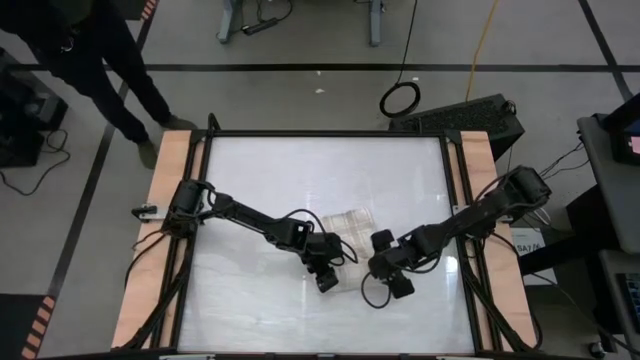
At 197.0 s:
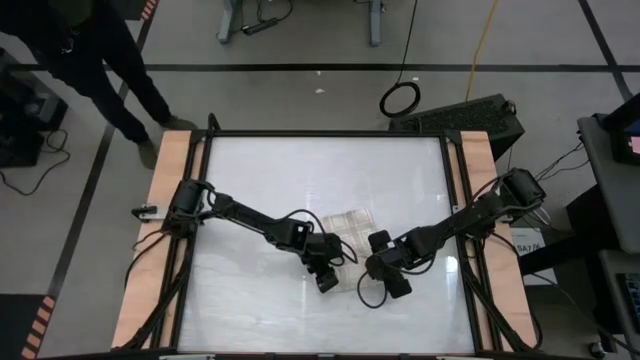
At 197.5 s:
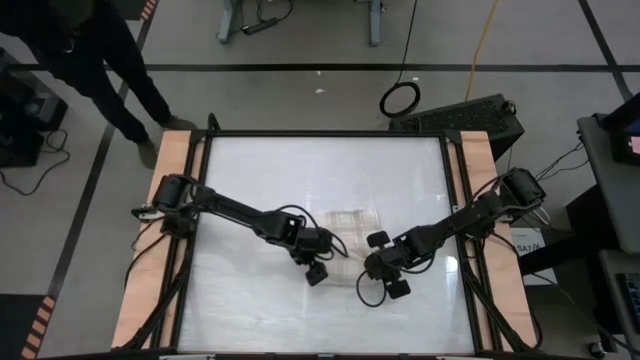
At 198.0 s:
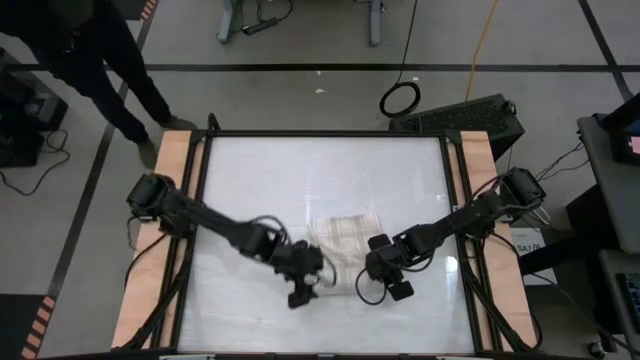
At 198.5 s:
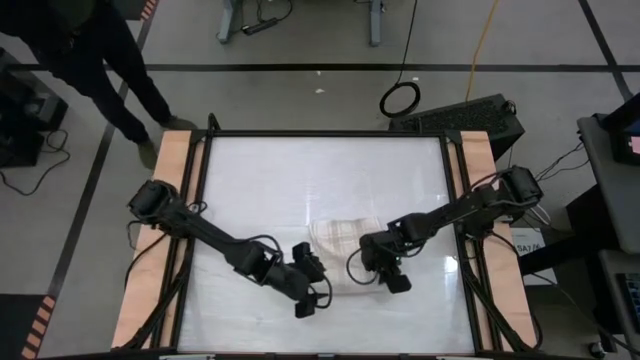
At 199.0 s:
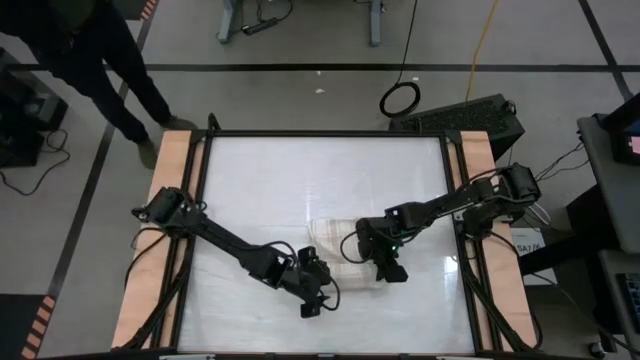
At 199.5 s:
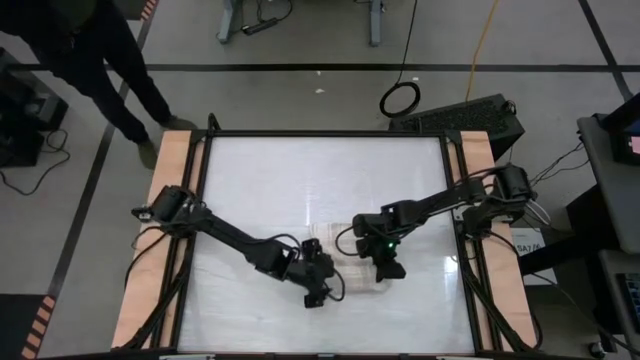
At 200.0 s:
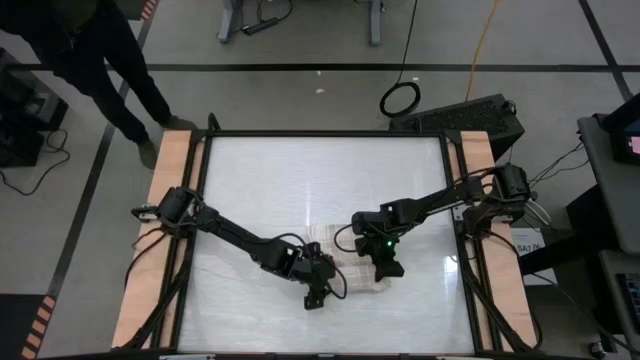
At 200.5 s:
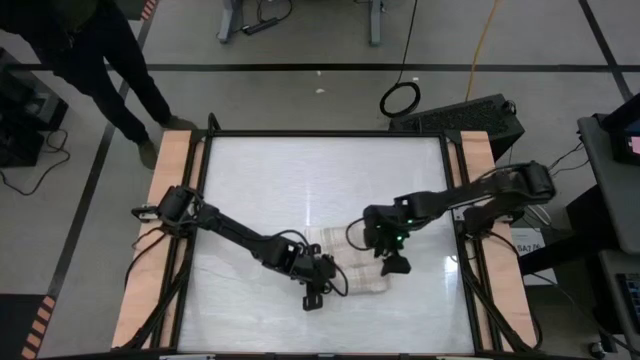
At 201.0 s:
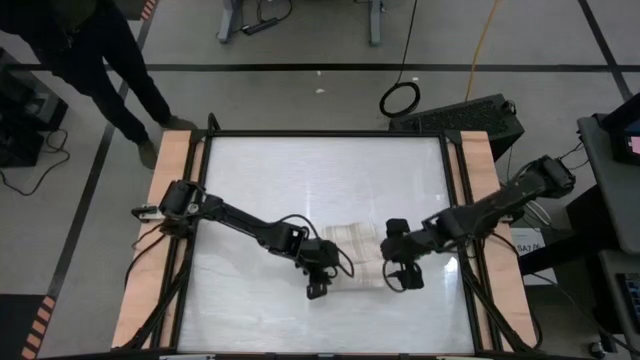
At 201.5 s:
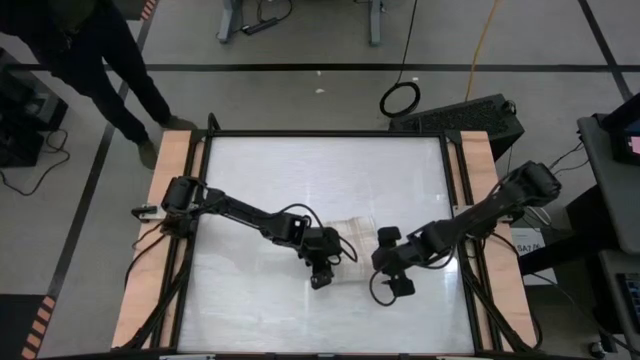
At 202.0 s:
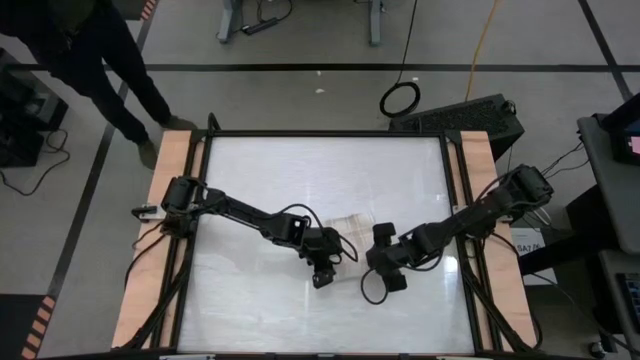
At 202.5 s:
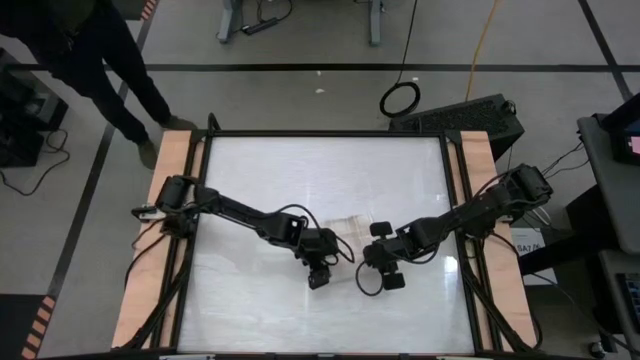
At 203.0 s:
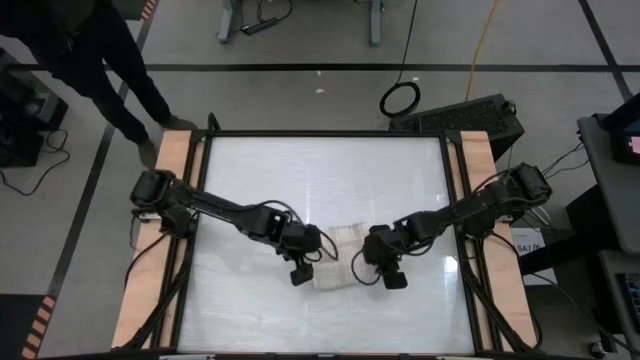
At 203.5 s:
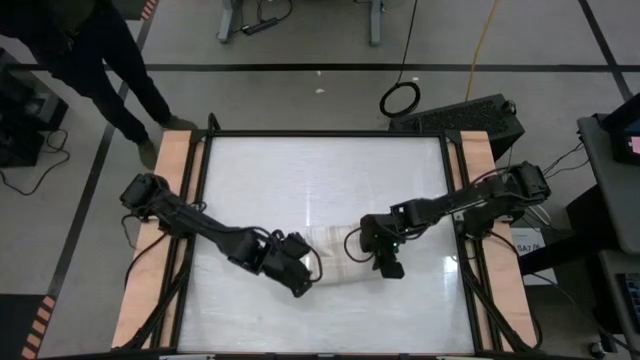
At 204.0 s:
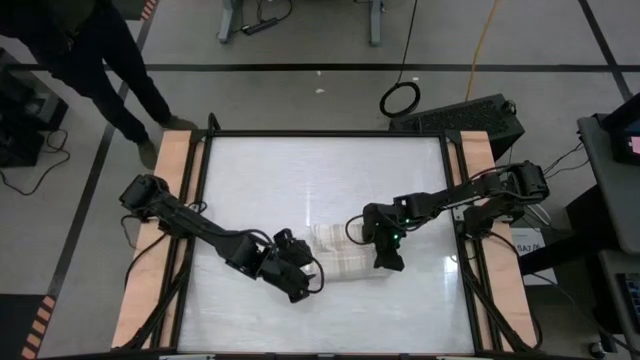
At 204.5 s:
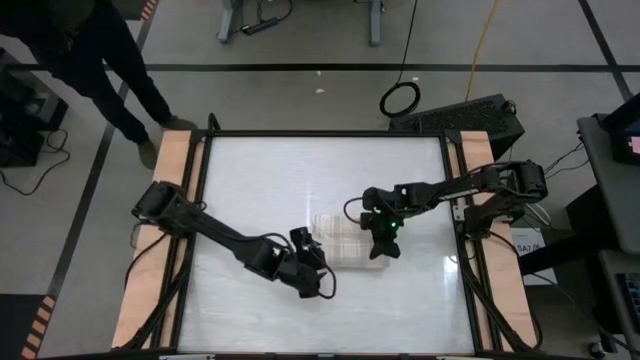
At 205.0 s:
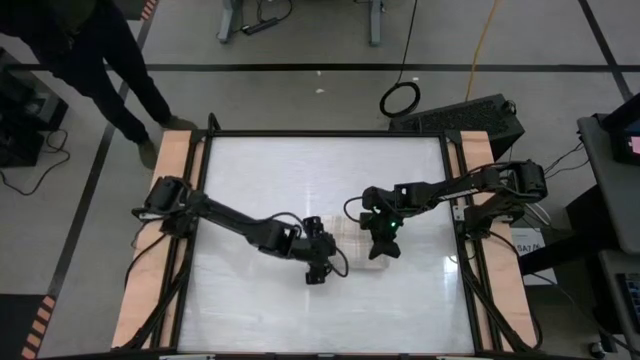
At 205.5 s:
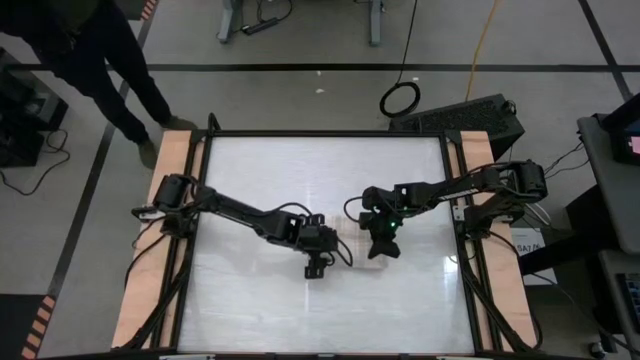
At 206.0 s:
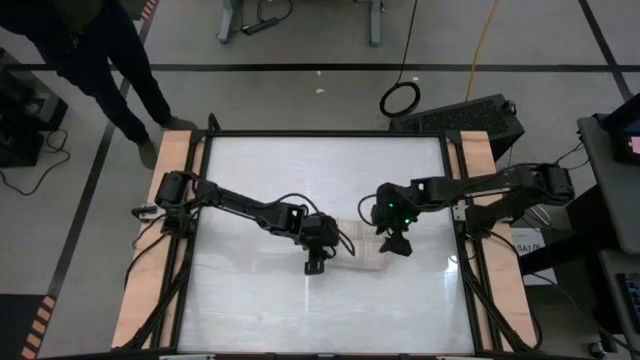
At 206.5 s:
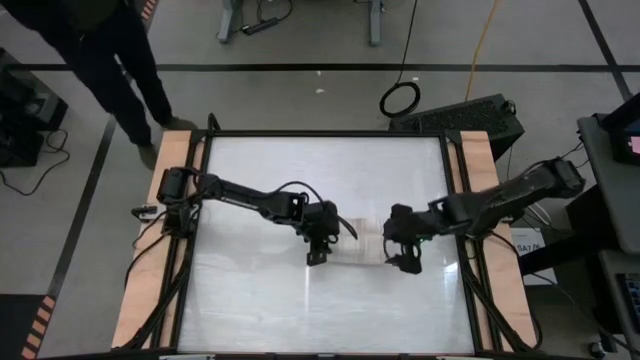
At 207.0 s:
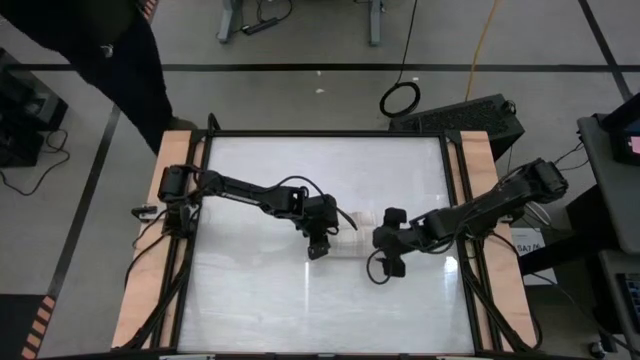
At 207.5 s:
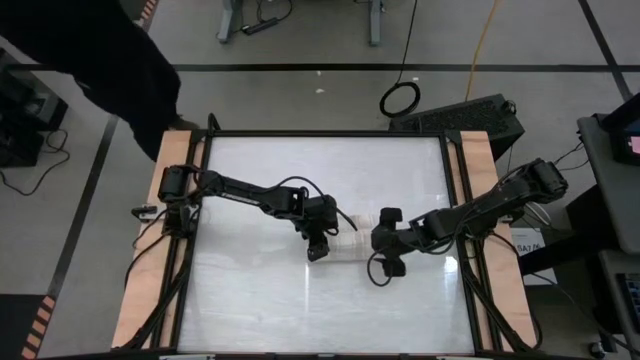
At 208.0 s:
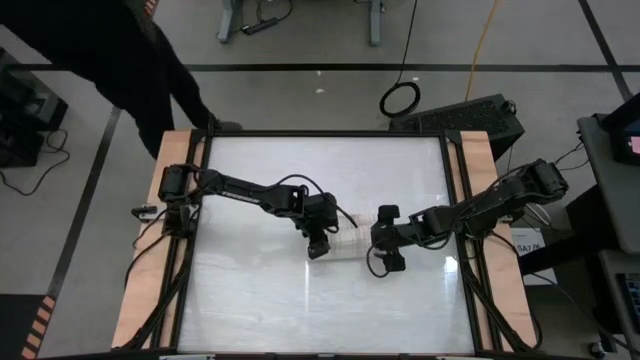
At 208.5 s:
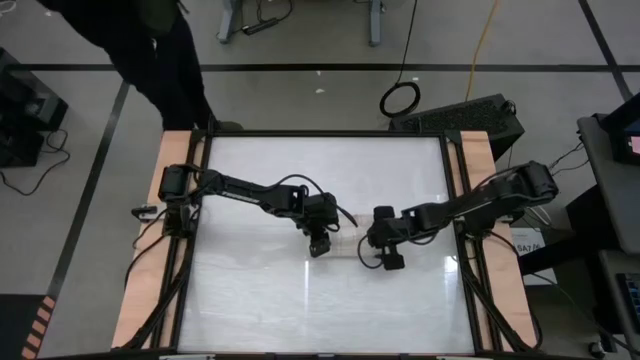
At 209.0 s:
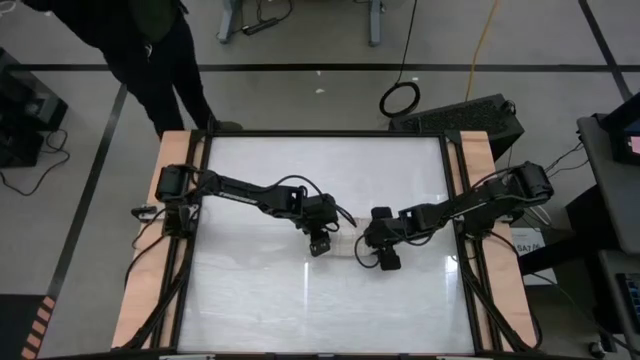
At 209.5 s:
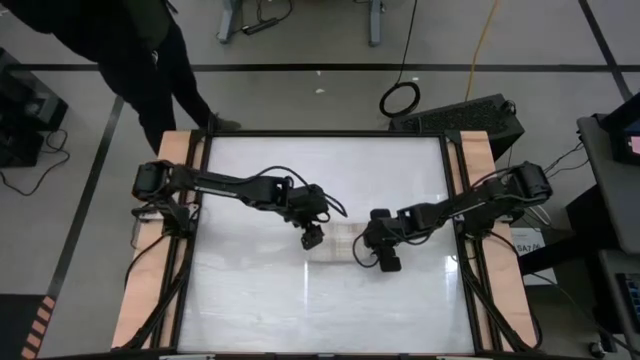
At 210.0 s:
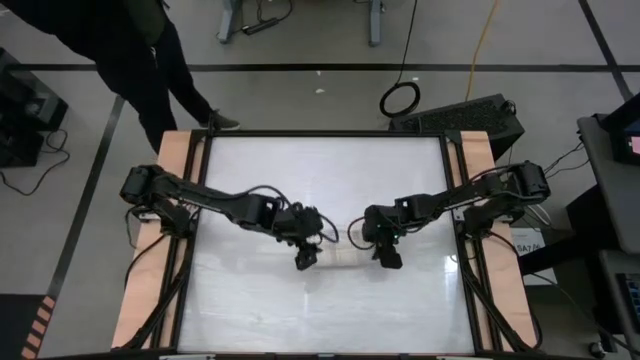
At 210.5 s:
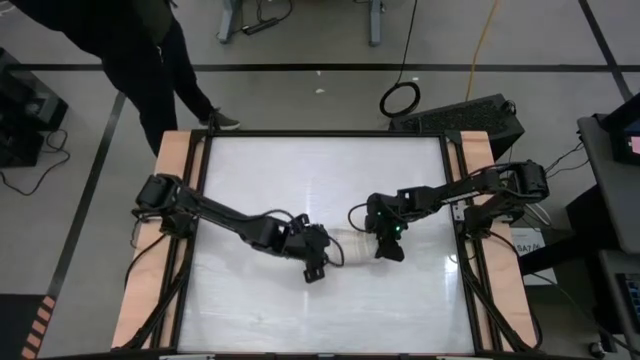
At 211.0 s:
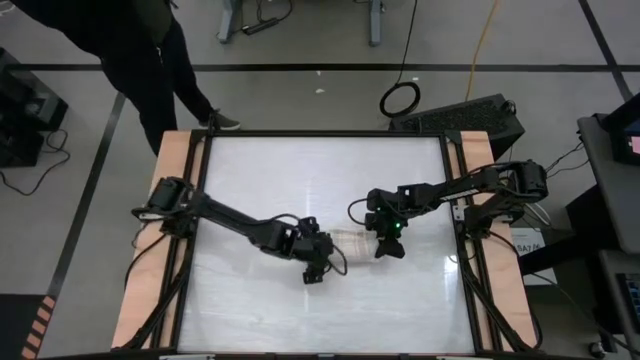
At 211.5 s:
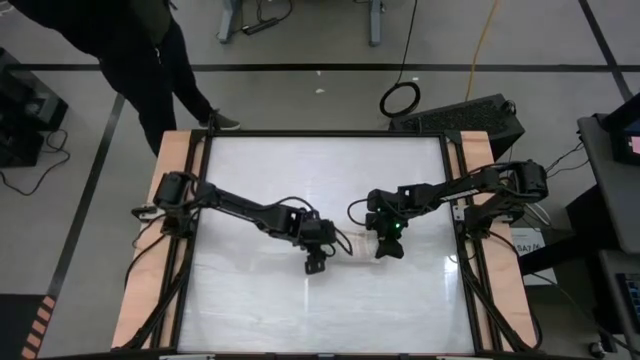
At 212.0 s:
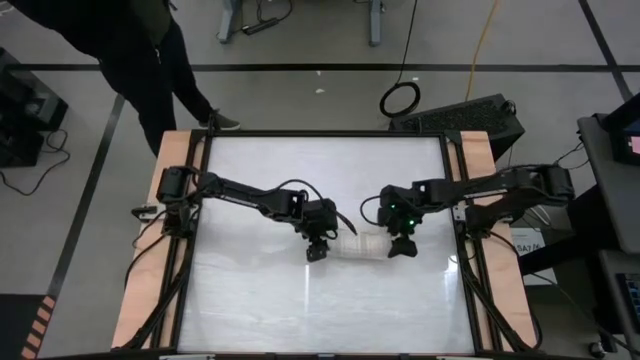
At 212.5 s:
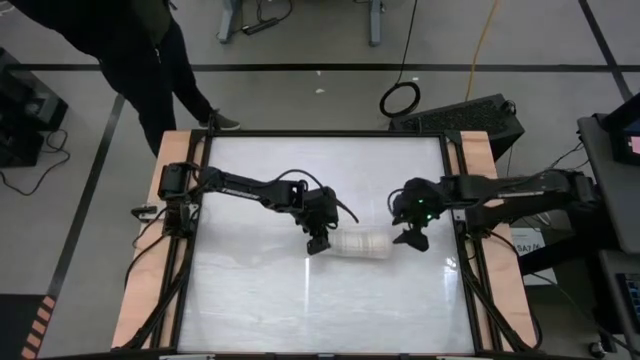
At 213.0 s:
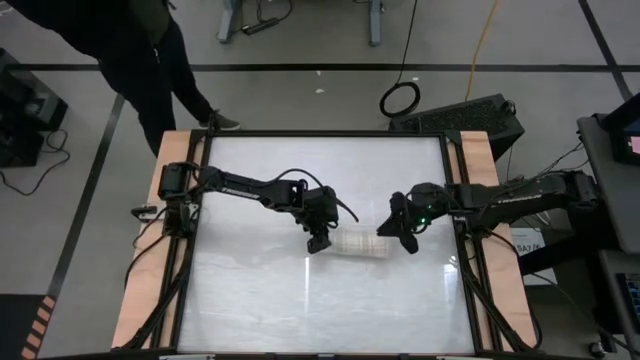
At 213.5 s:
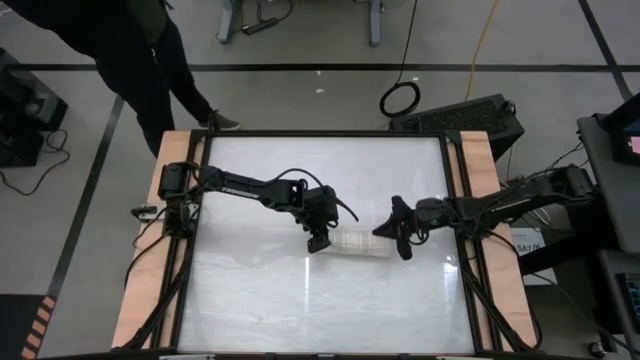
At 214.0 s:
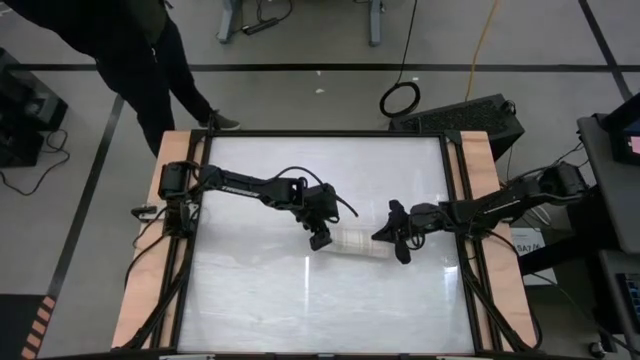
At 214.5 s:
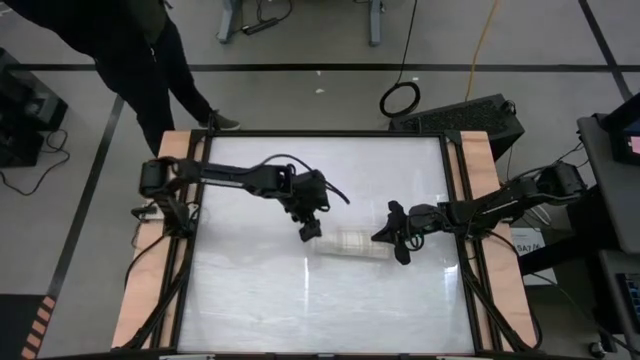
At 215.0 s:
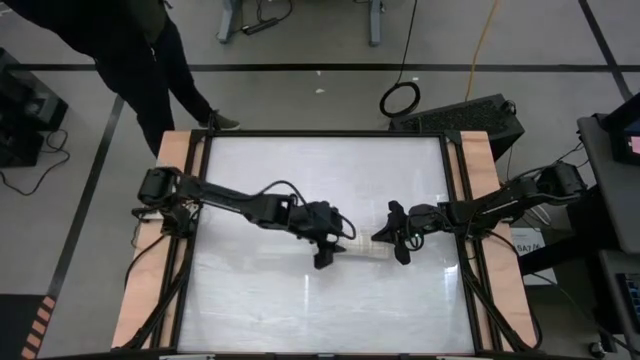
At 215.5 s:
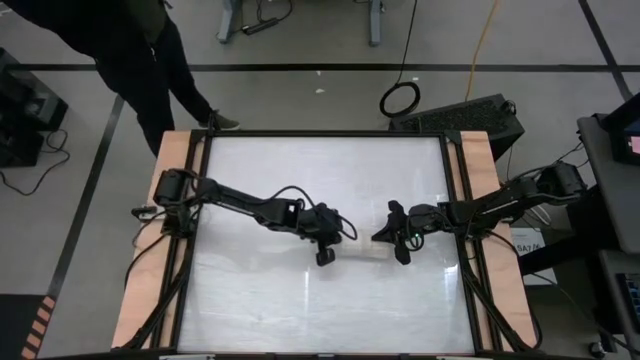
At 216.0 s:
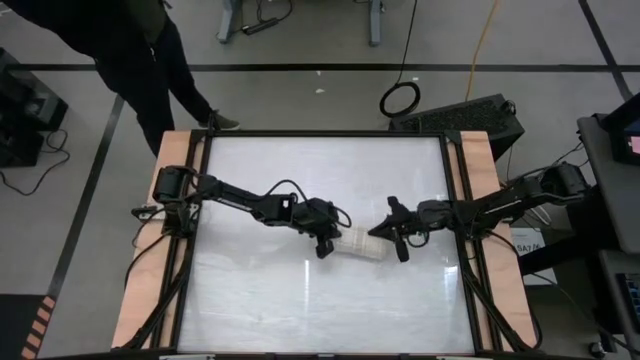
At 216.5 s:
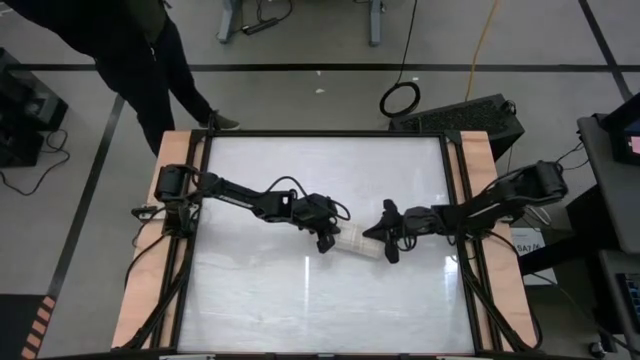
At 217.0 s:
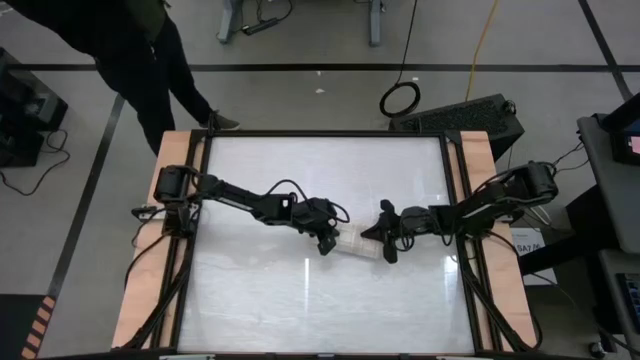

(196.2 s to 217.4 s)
Task: Roll towel
Roll the white-brown patterned towel

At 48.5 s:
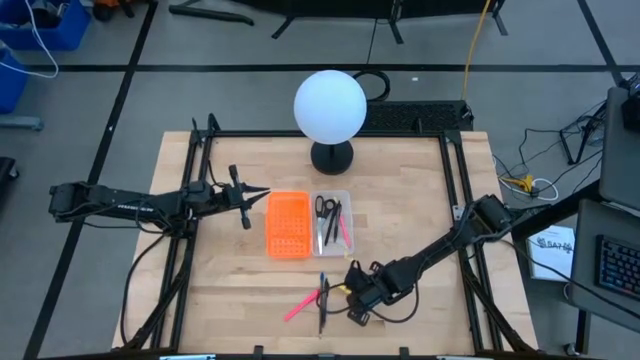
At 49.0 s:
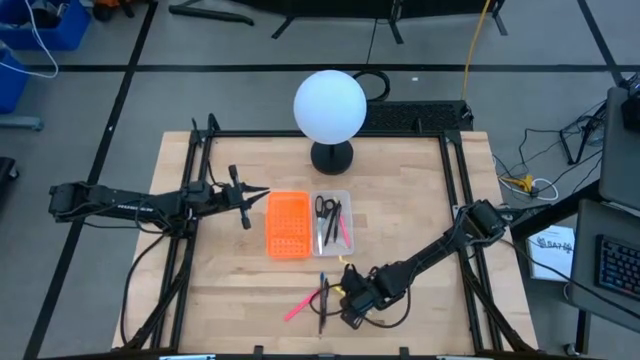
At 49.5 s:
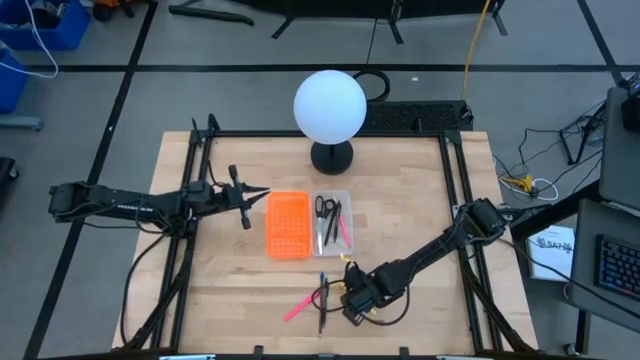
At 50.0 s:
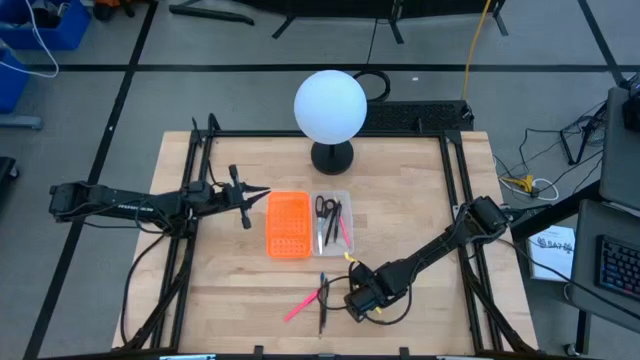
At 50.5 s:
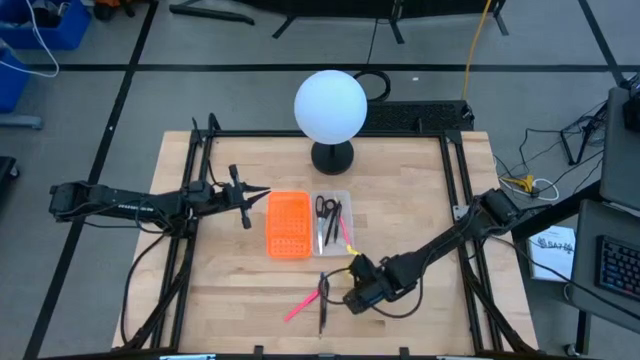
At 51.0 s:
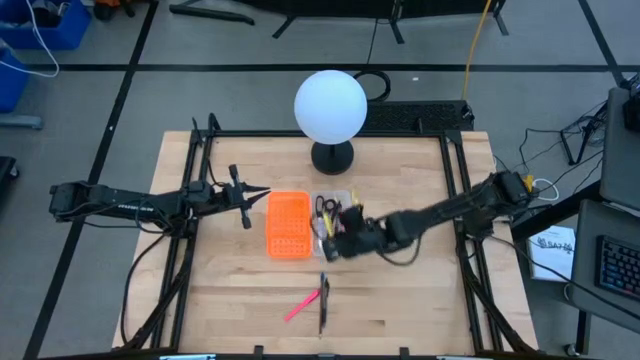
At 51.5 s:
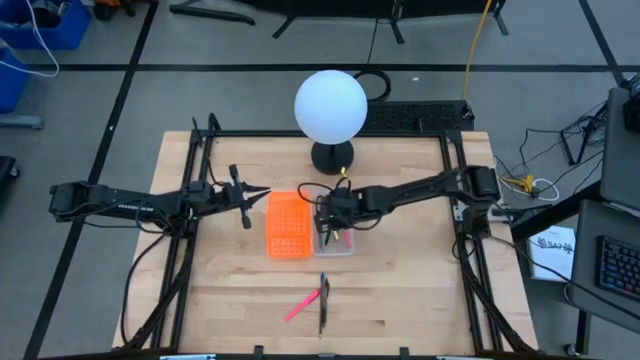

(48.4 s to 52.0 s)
Task: Pick & place school supplies into a supply box
Put the yellow highlighter into the supply box
